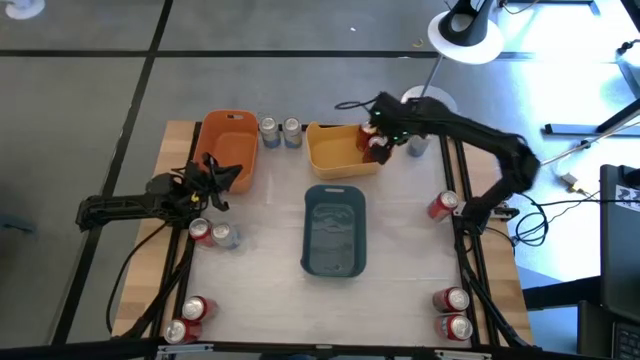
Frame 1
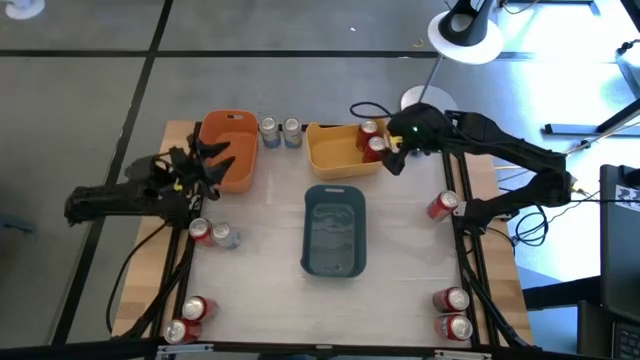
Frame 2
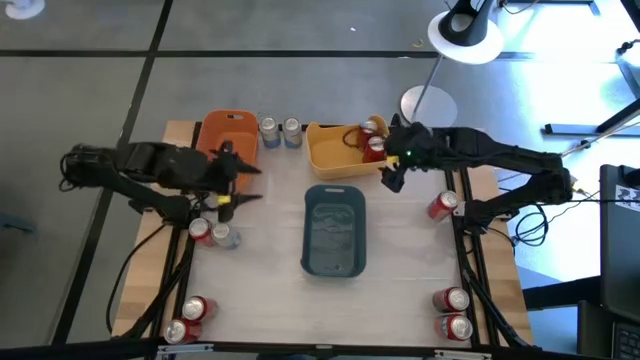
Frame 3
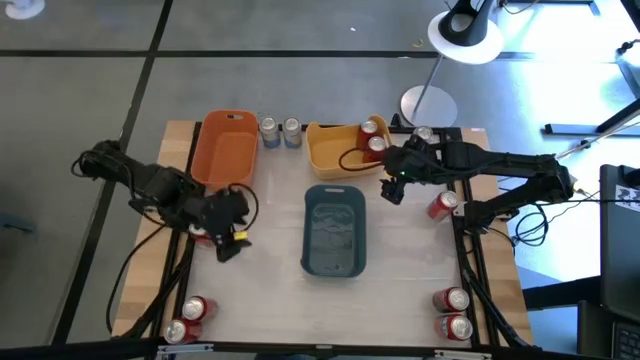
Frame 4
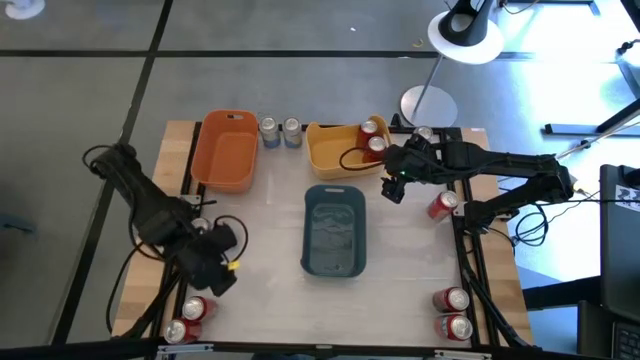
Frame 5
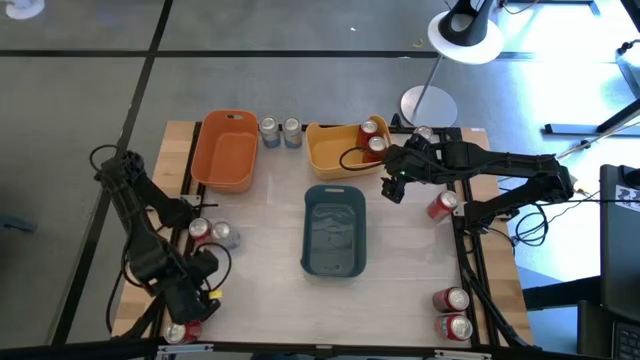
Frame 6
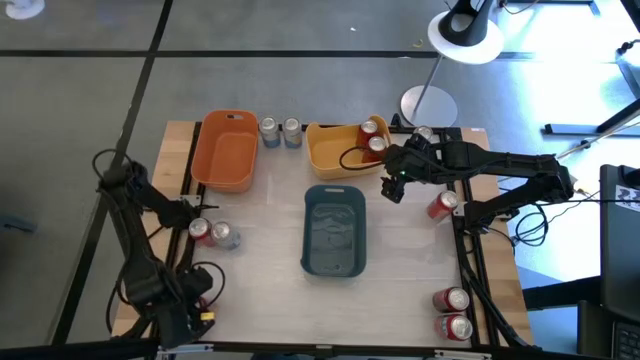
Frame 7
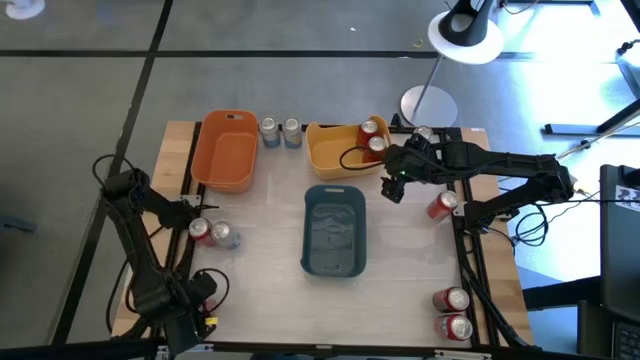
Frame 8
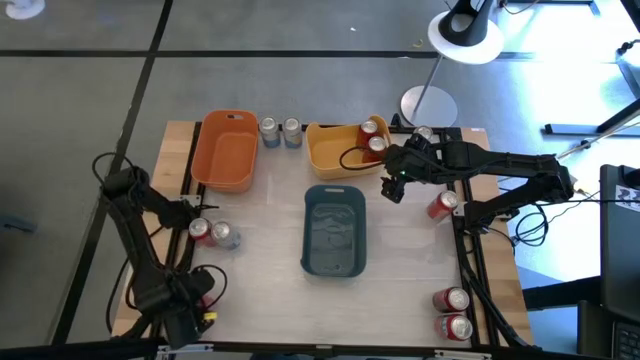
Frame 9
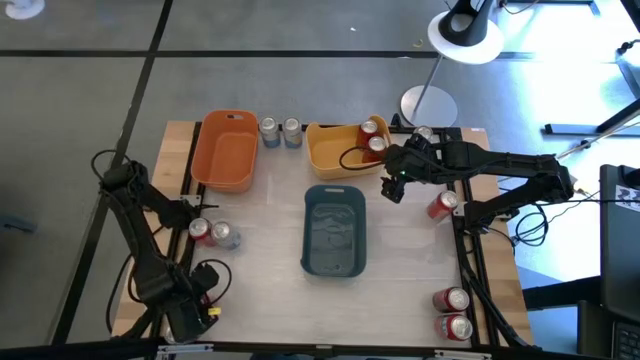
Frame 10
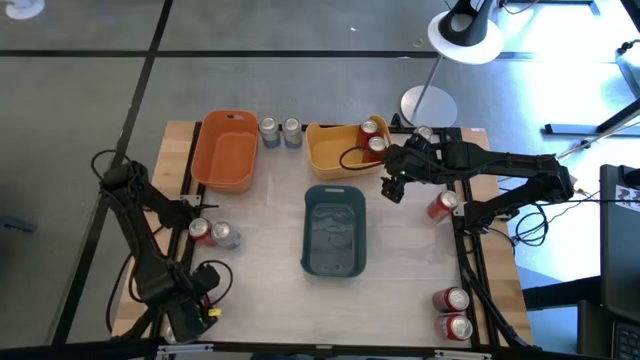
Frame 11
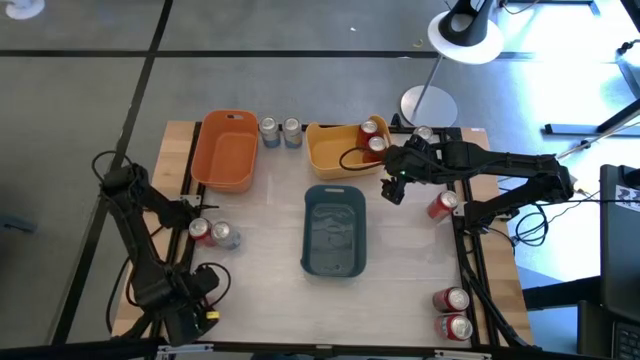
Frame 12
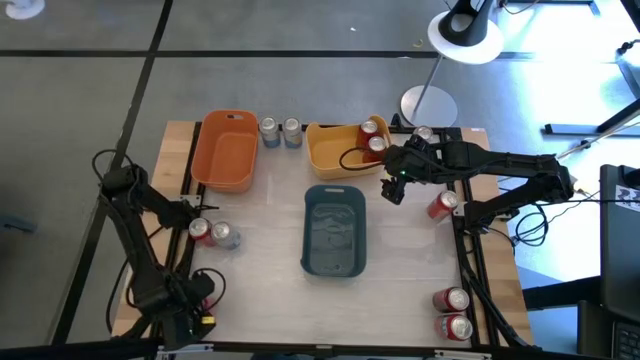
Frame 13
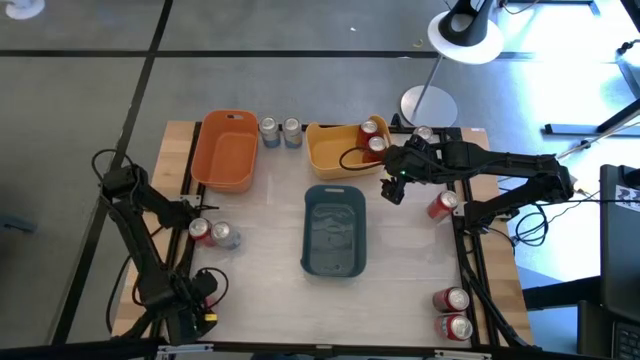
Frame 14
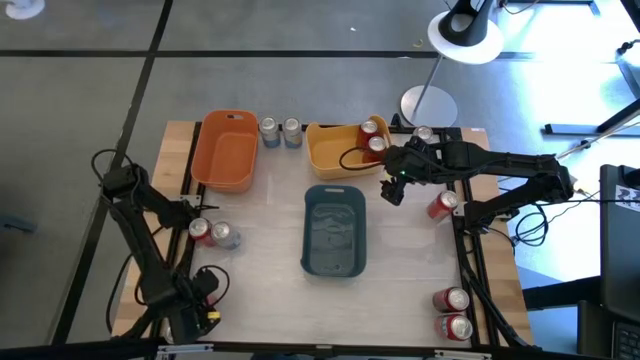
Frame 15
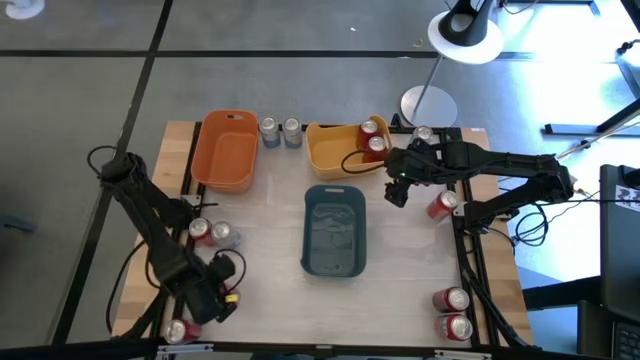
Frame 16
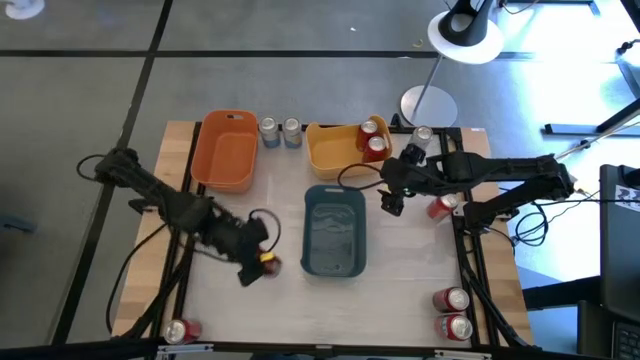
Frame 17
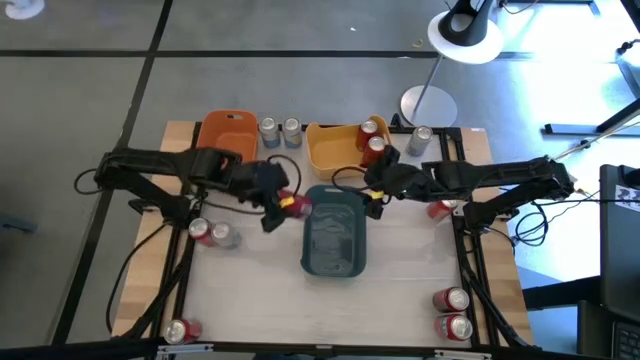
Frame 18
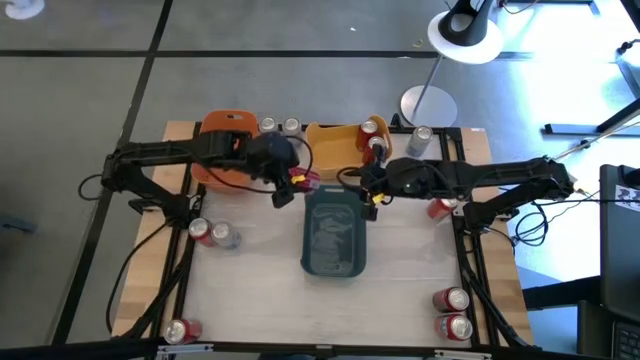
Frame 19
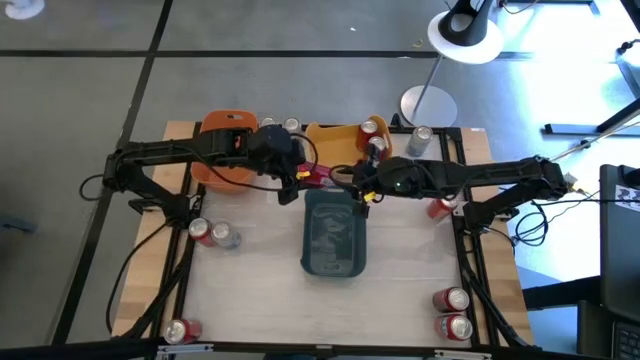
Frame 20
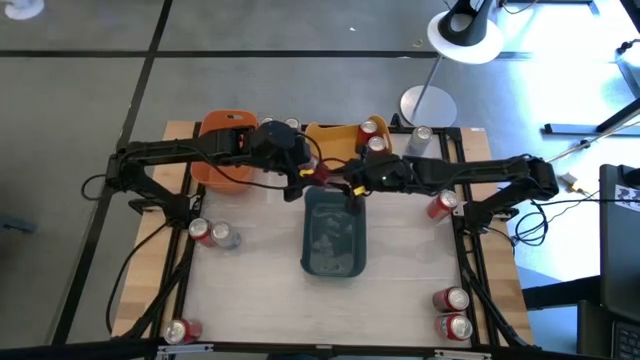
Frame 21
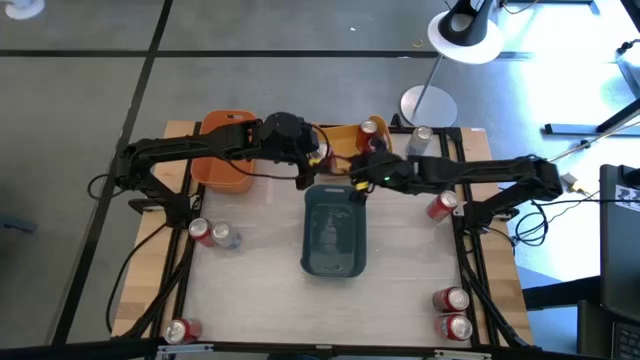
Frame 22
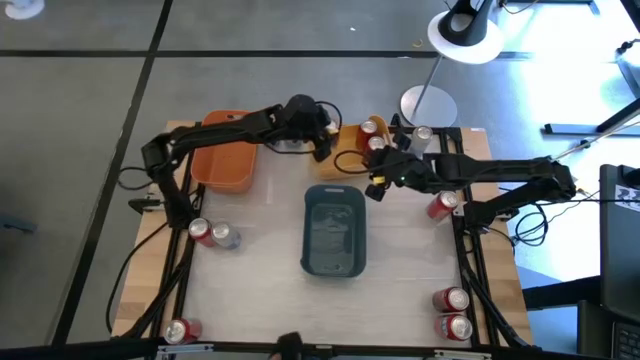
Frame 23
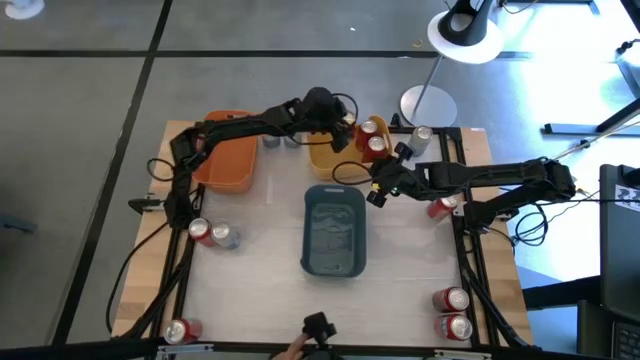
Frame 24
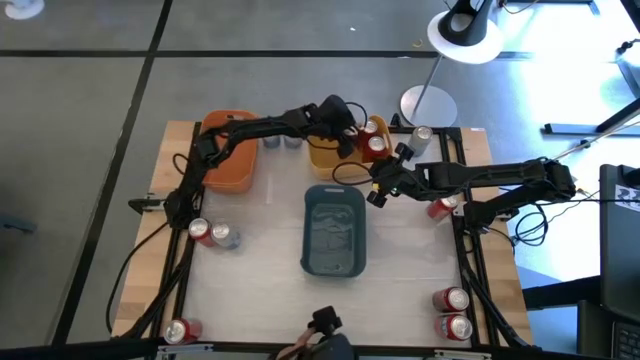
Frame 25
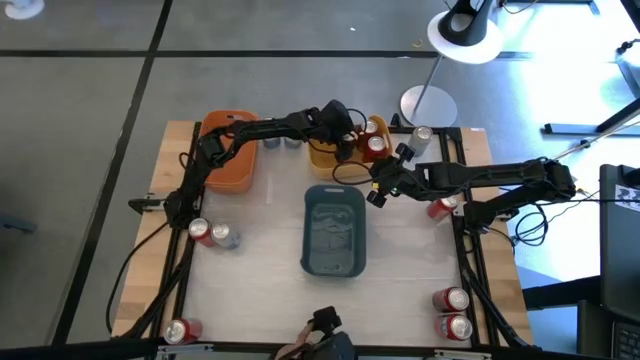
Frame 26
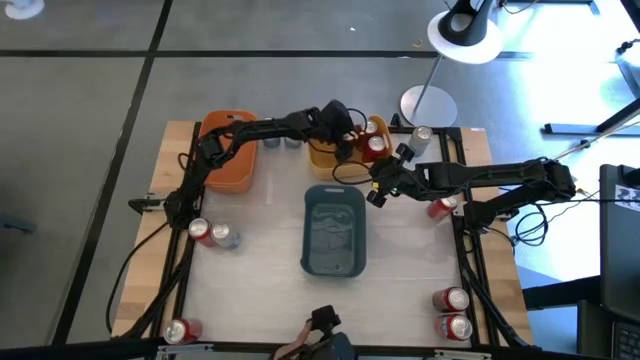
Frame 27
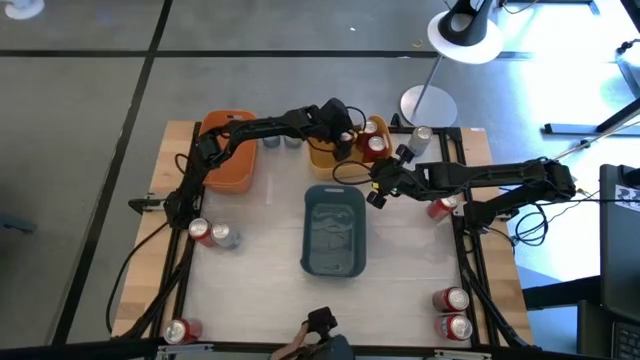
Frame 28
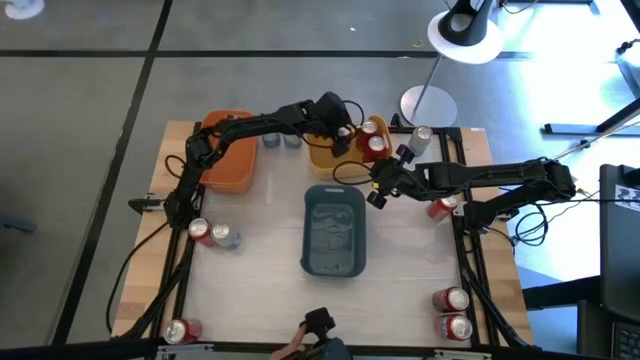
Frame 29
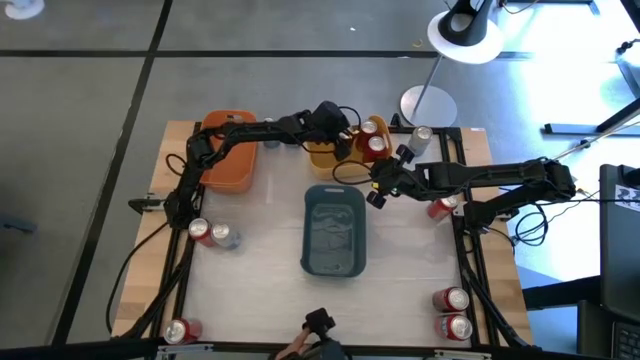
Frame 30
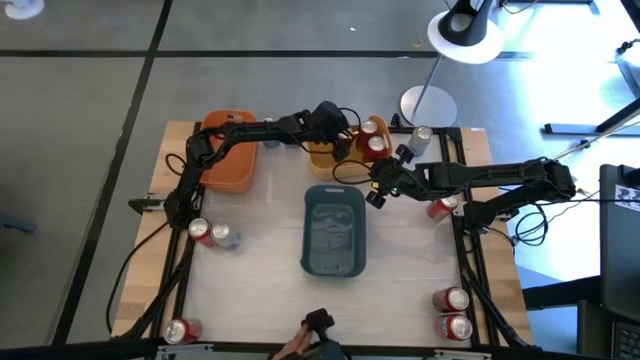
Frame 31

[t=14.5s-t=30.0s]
Task: Sort soda cans
Put the left red soda can into the yellow bin

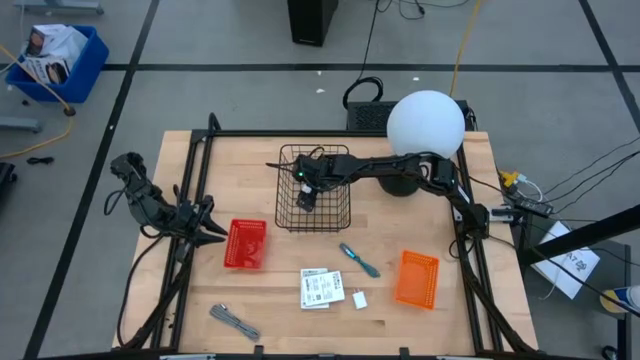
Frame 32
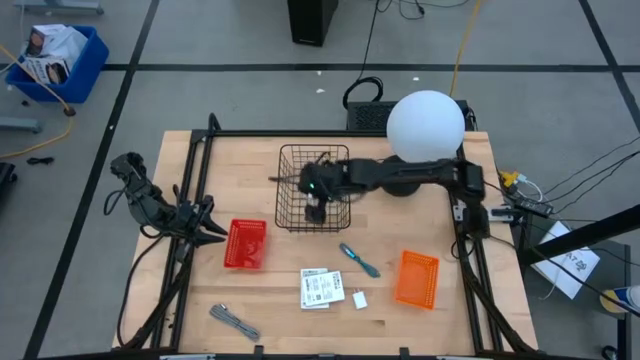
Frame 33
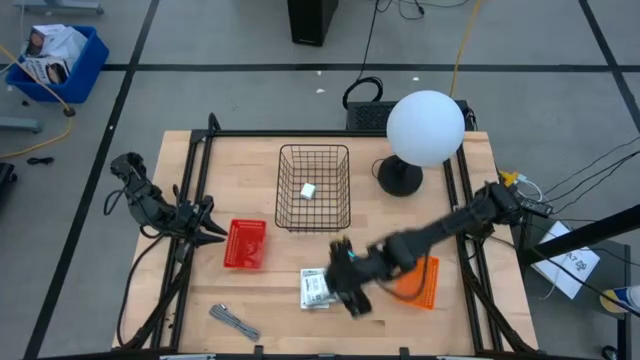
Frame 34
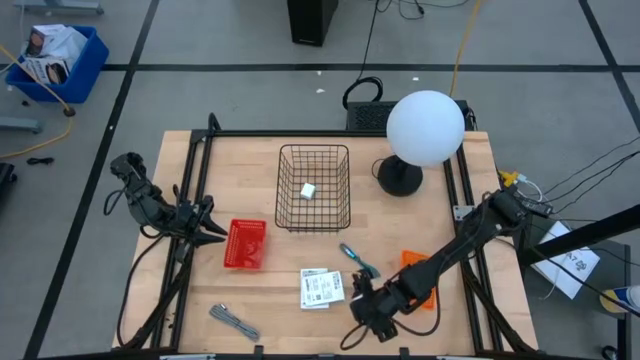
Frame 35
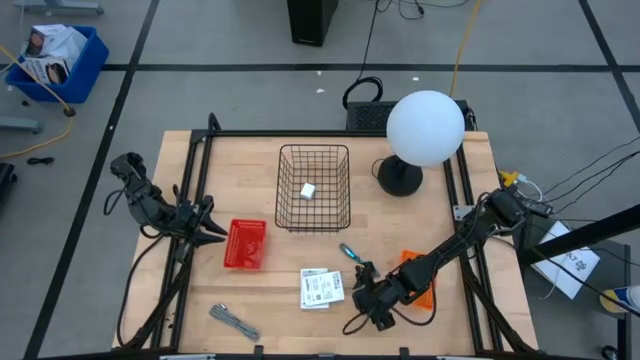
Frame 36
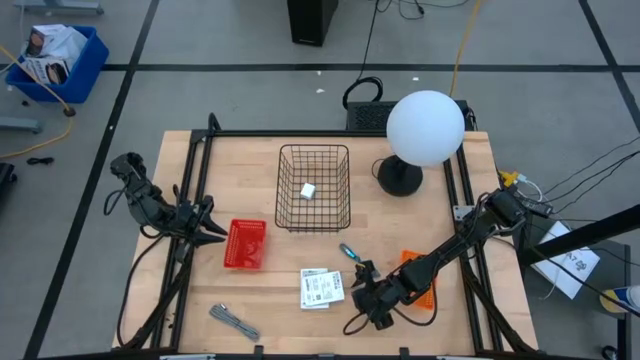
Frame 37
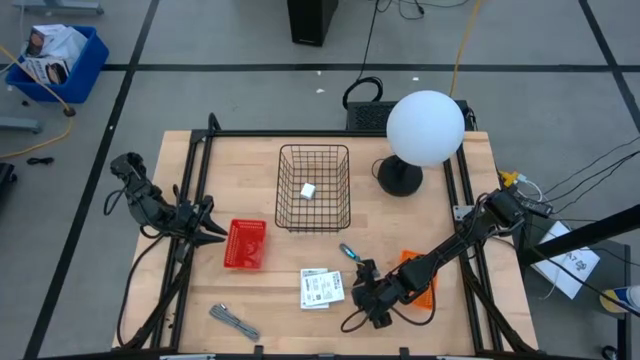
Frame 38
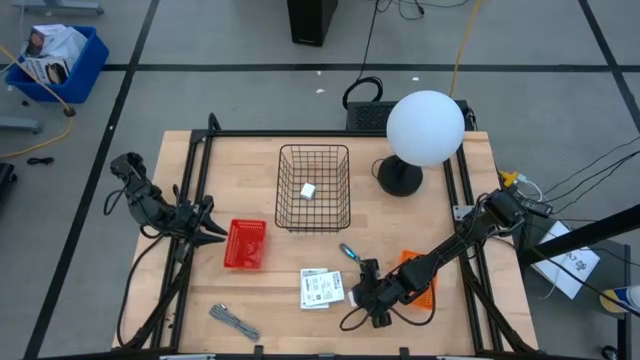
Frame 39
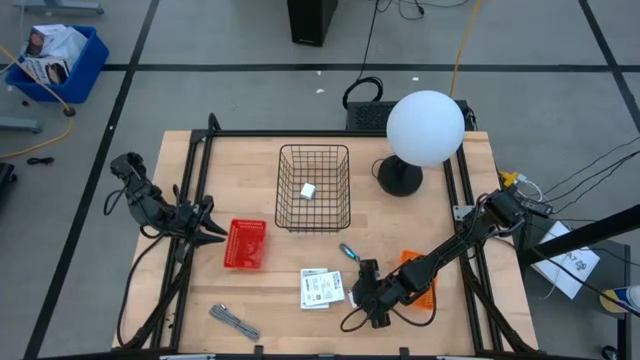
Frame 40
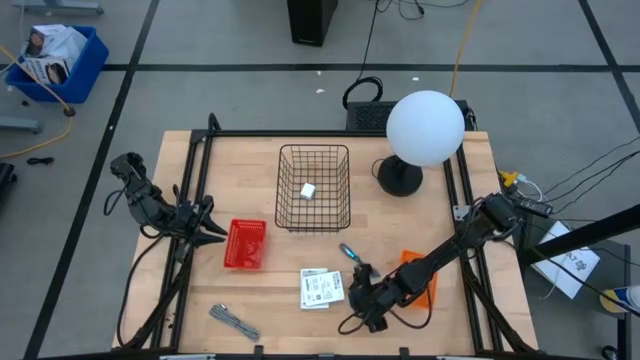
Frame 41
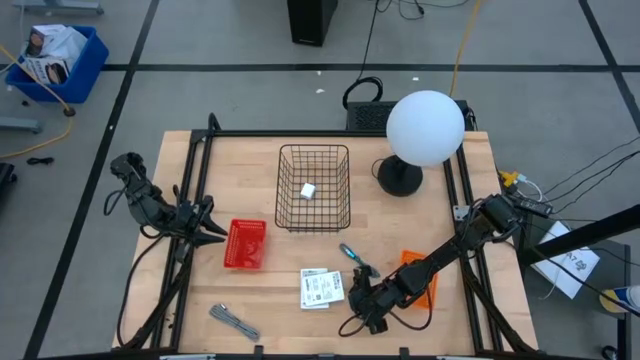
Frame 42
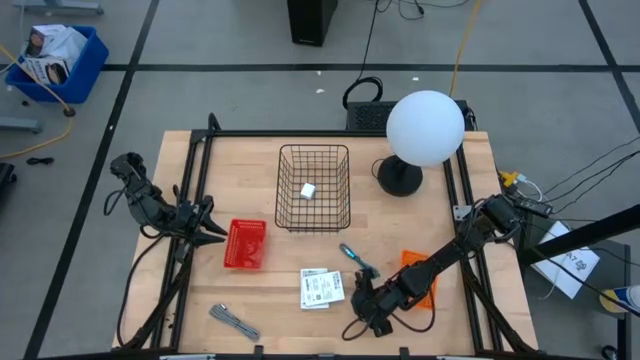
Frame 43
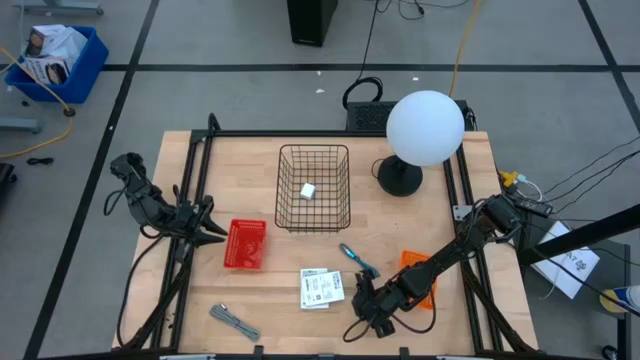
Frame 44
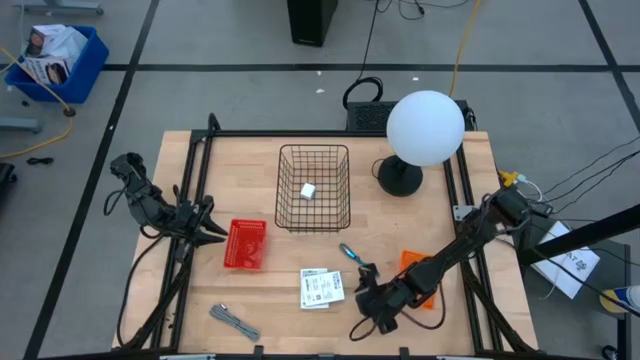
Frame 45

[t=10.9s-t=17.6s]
Task: Pick and place items into bin
Put the white charger adapter into the black wire basket
